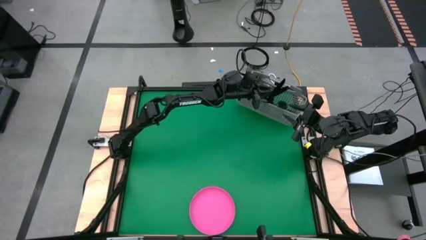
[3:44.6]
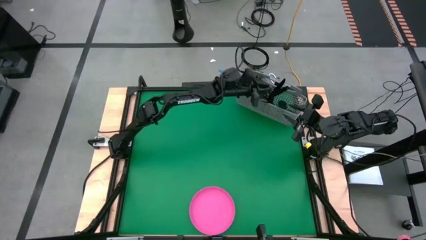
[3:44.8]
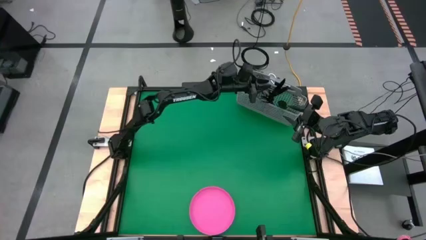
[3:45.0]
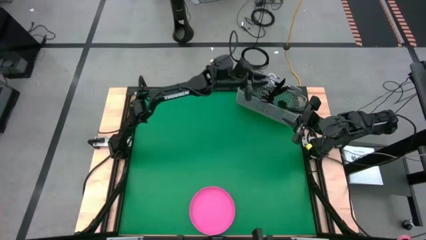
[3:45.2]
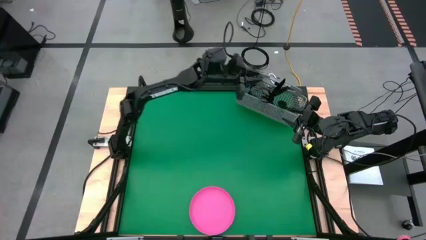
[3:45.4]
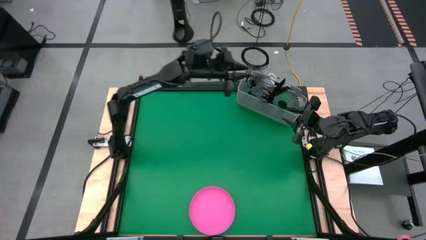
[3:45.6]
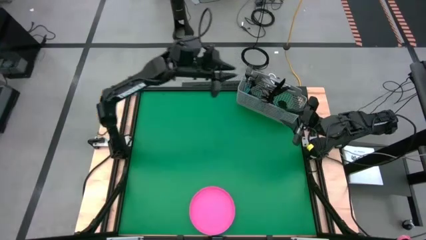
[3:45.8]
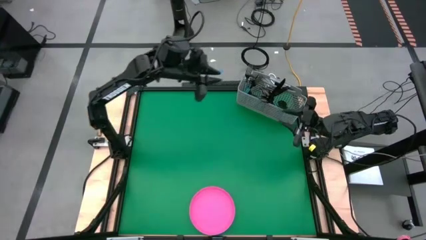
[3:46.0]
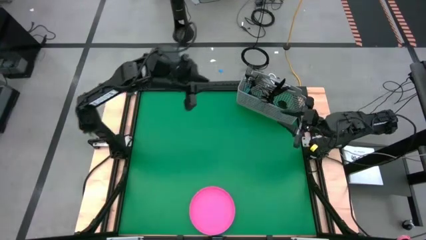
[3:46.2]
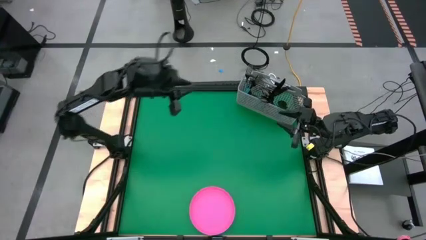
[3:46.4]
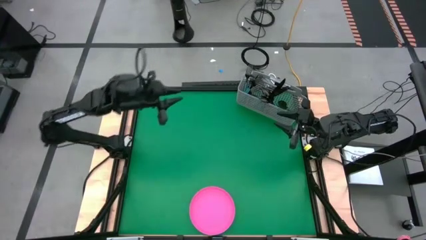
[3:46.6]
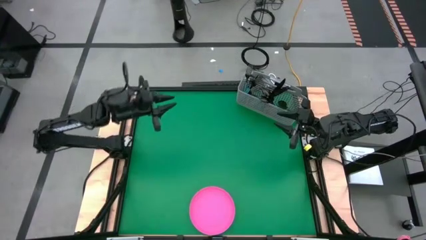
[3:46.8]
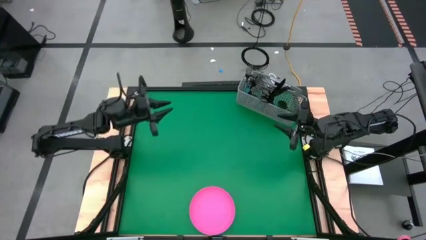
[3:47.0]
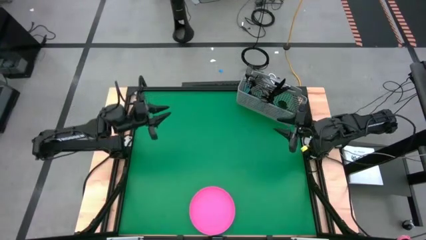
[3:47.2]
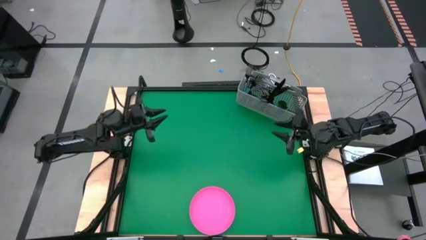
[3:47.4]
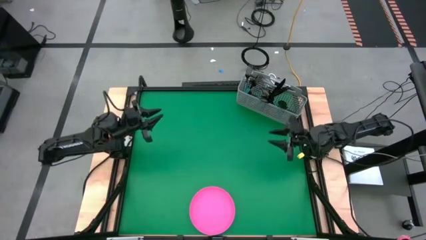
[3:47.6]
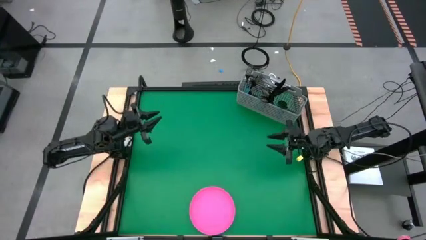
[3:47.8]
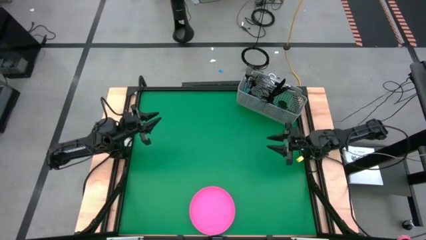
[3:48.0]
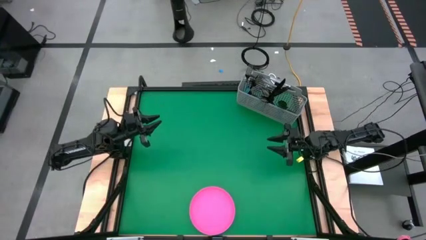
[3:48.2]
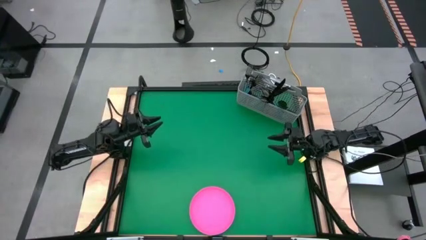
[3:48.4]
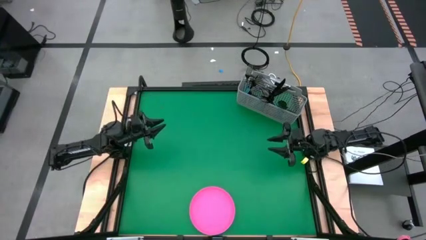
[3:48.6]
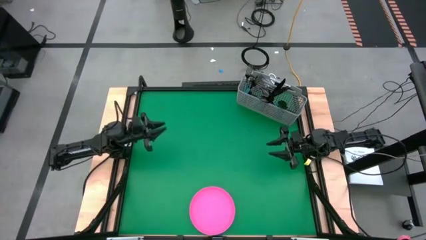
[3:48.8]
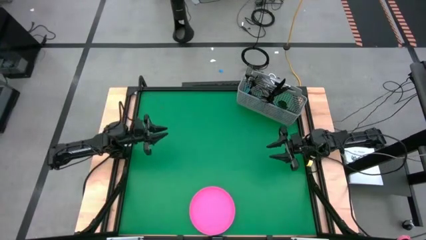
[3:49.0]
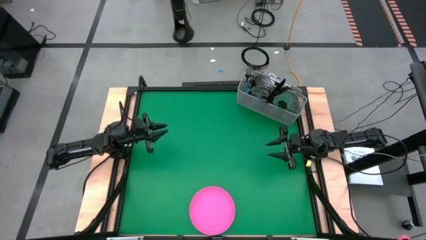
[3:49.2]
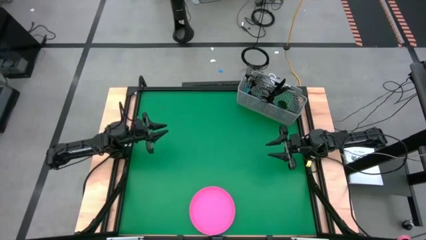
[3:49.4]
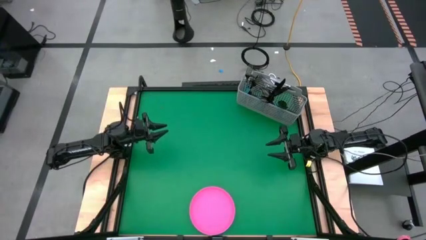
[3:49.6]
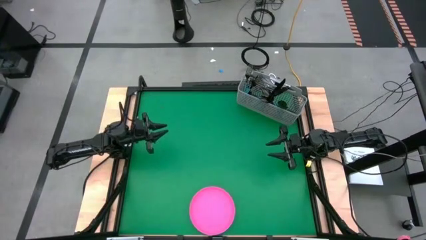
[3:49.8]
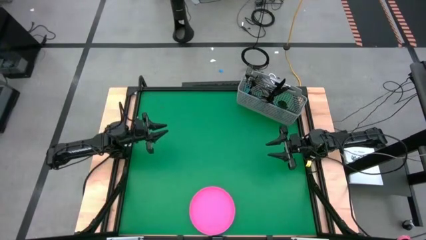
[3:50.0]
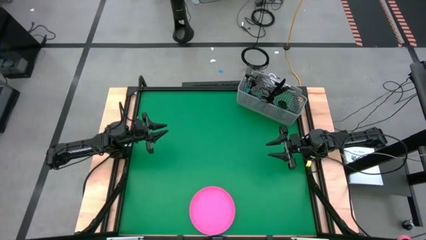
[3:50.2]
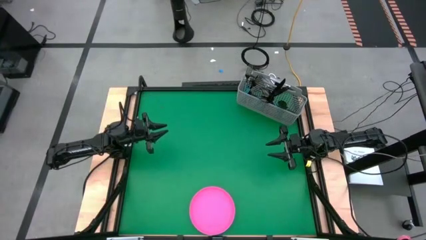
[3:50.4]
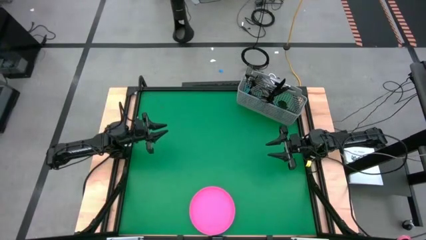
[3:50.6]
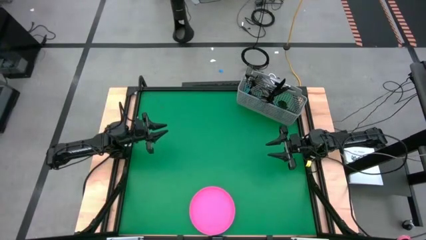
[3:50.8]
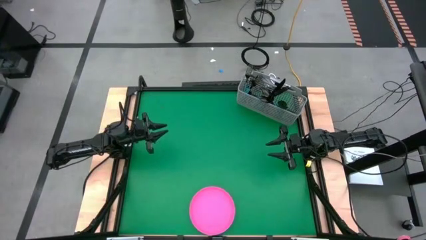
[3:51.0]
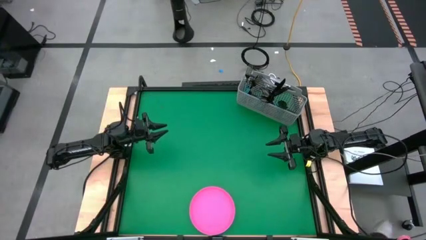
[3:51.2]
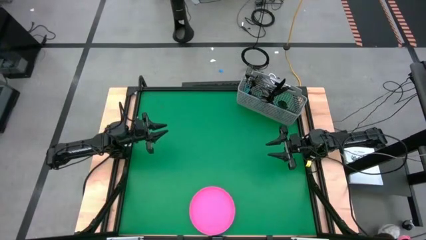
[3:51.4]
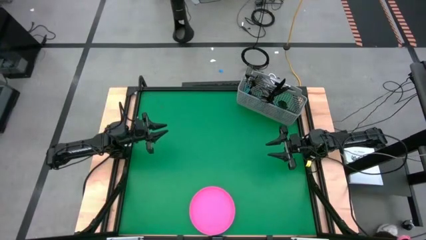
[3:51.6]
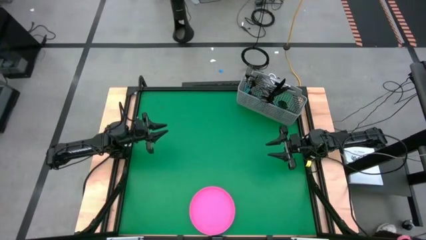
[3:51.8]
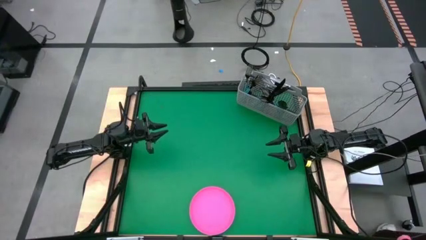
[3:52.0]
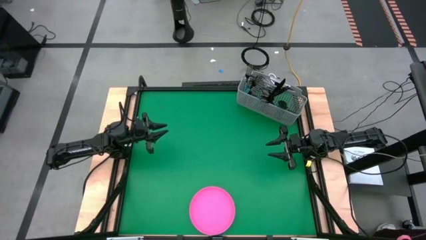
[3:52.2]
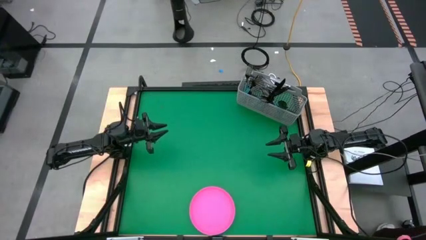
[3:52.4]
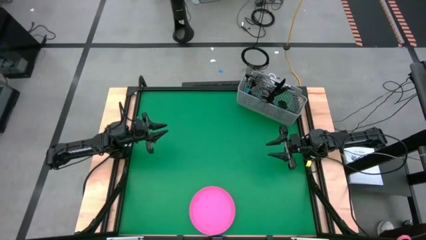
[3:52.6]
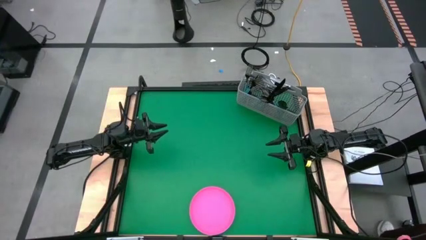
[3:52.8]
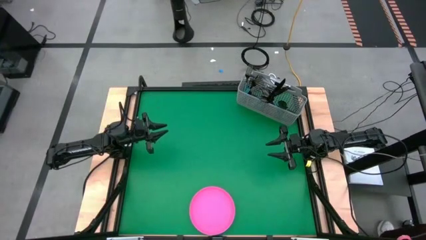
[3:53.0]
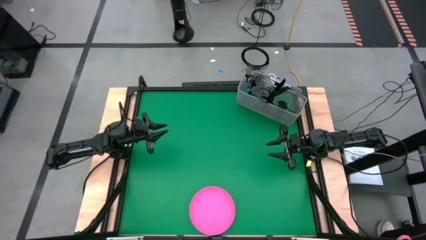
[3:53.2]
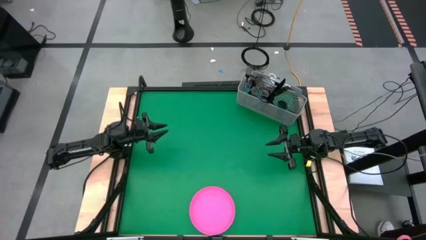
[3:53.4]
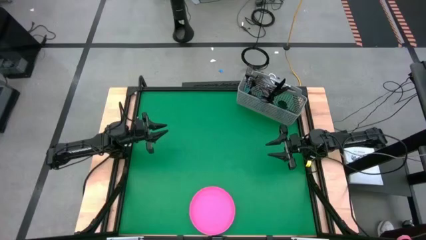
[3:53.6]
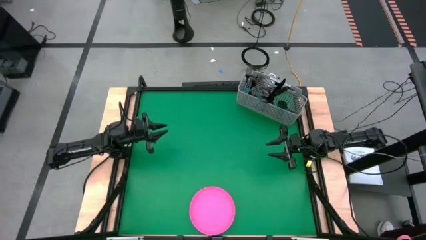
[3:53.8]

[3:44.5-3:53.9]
Task: Sort silverware
Return to Home Position

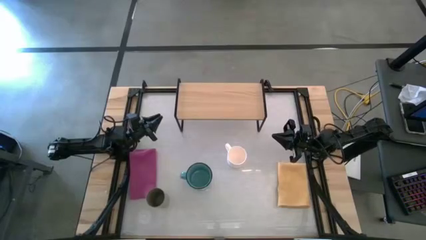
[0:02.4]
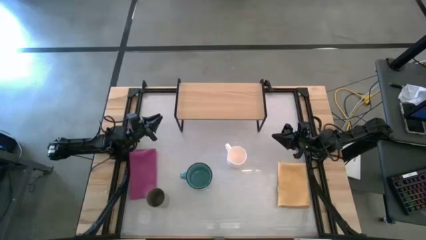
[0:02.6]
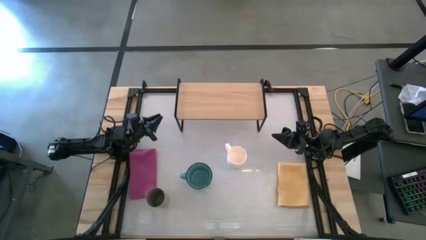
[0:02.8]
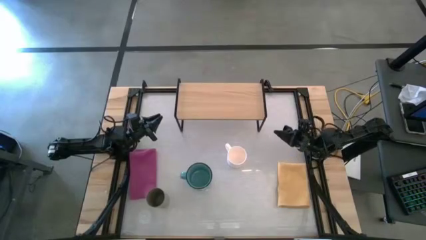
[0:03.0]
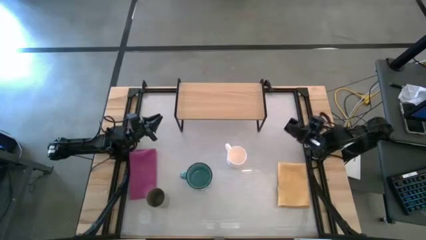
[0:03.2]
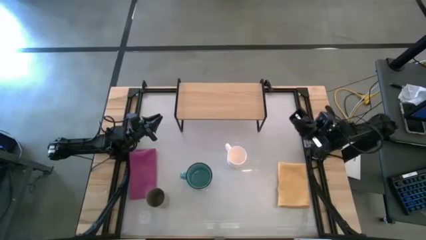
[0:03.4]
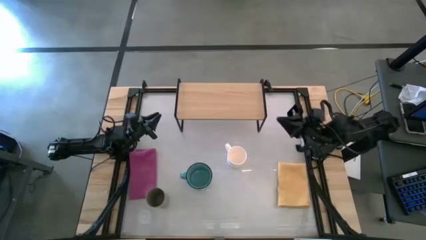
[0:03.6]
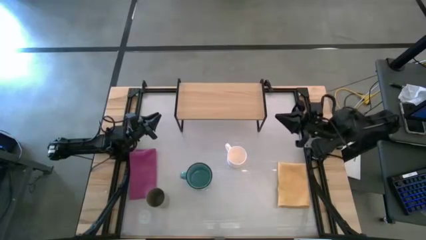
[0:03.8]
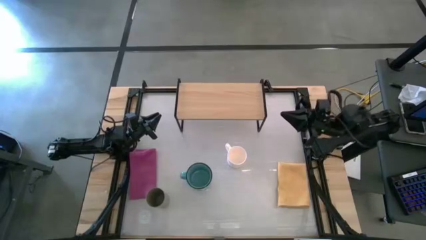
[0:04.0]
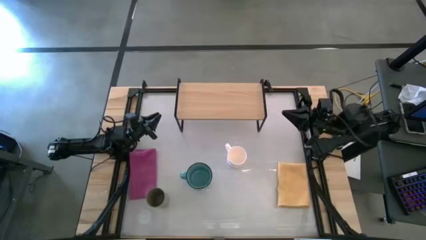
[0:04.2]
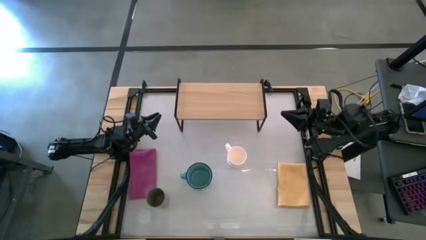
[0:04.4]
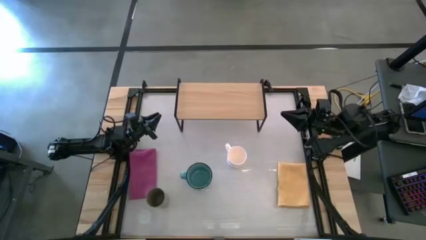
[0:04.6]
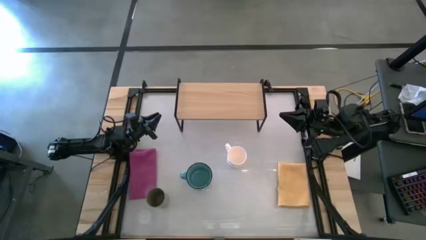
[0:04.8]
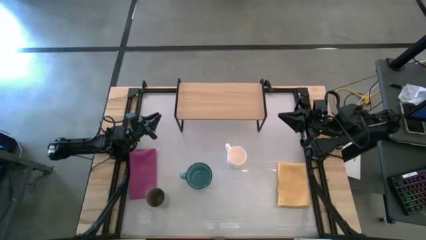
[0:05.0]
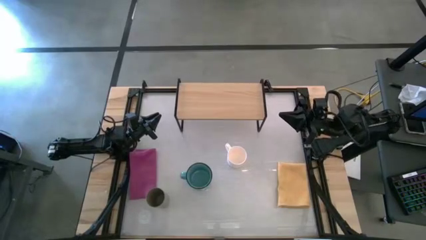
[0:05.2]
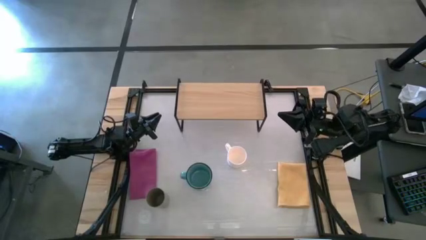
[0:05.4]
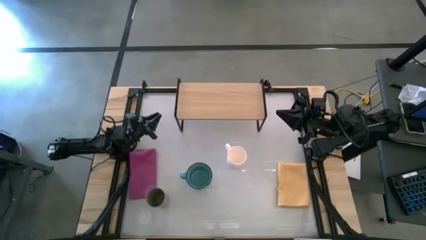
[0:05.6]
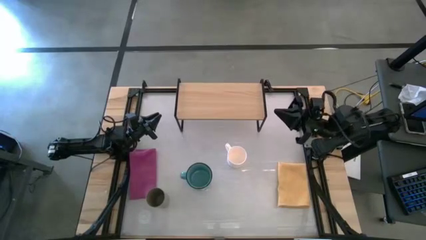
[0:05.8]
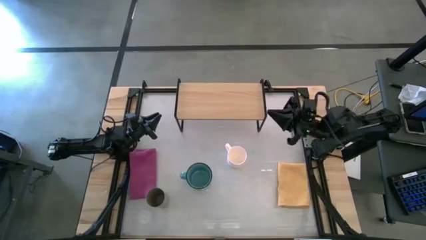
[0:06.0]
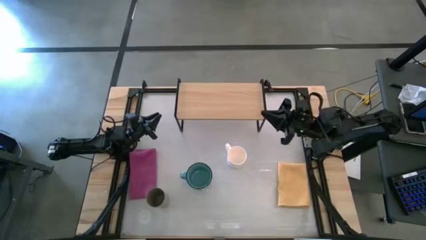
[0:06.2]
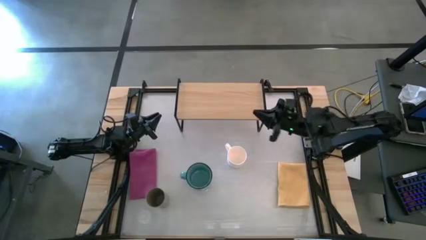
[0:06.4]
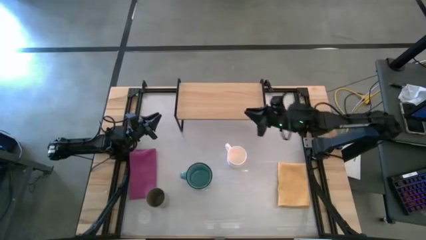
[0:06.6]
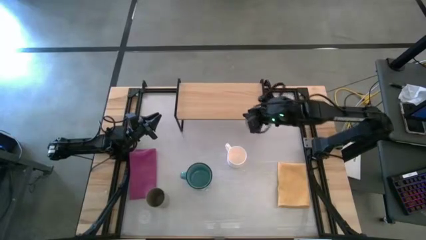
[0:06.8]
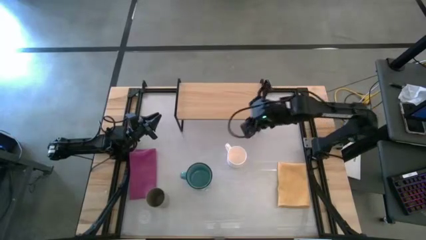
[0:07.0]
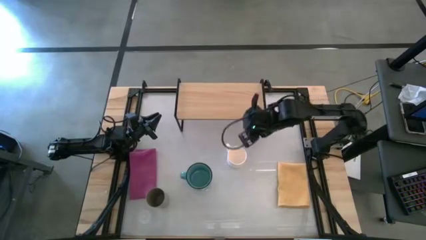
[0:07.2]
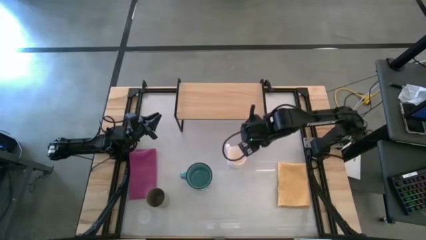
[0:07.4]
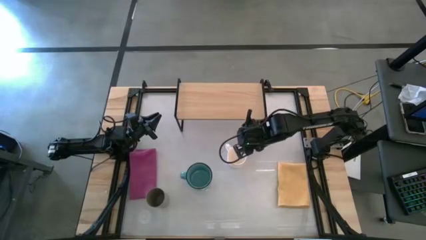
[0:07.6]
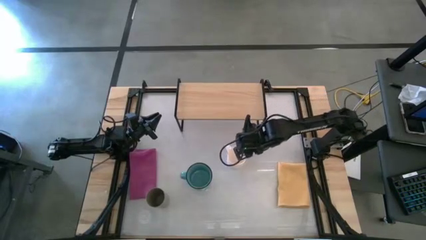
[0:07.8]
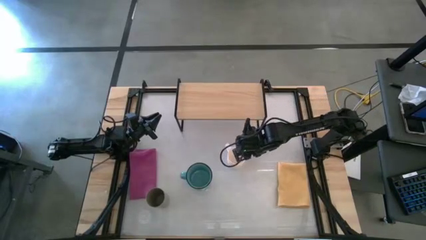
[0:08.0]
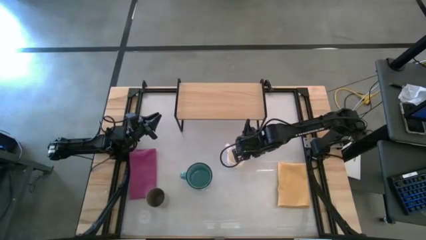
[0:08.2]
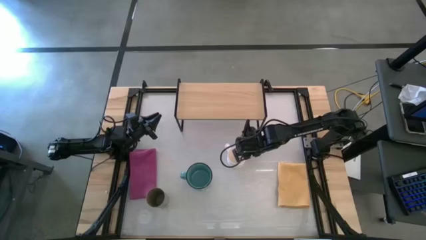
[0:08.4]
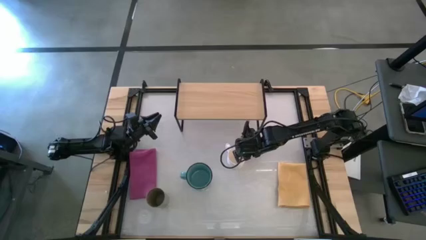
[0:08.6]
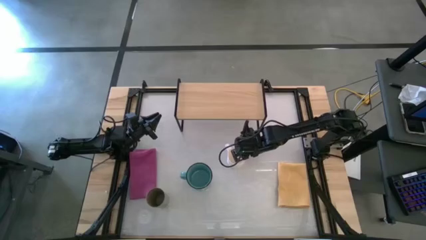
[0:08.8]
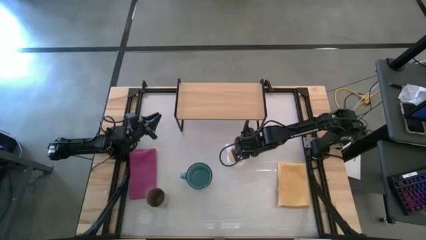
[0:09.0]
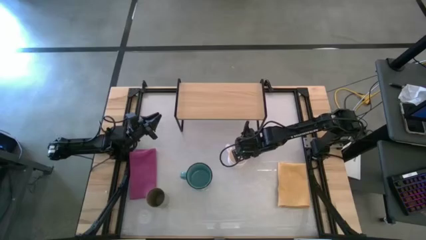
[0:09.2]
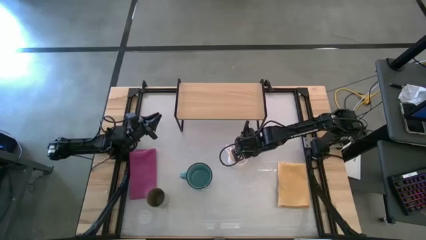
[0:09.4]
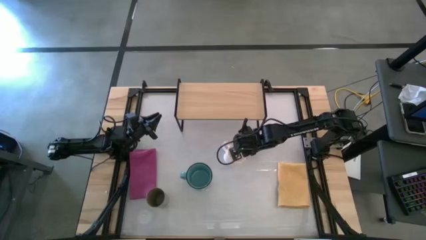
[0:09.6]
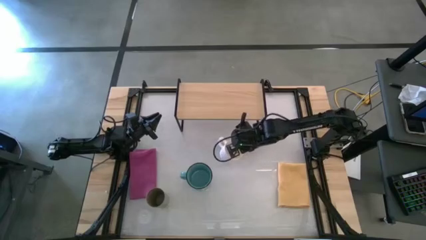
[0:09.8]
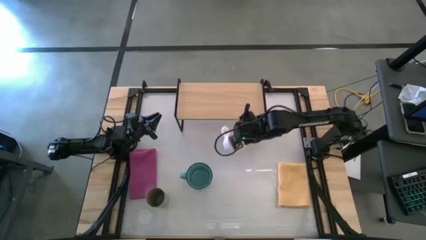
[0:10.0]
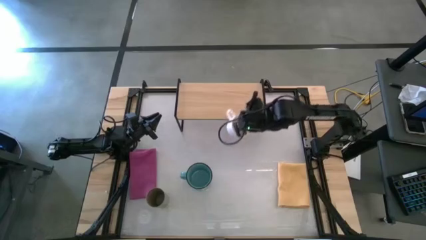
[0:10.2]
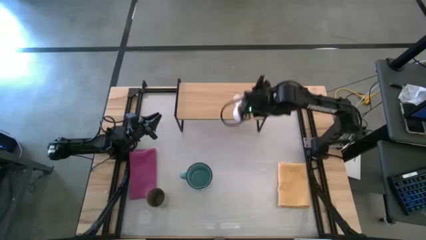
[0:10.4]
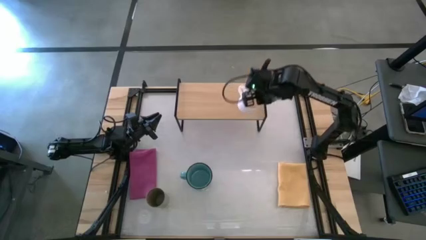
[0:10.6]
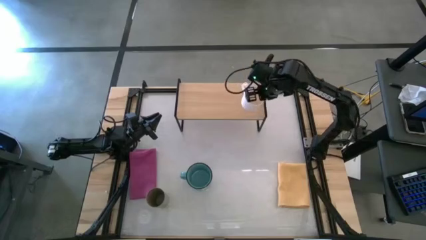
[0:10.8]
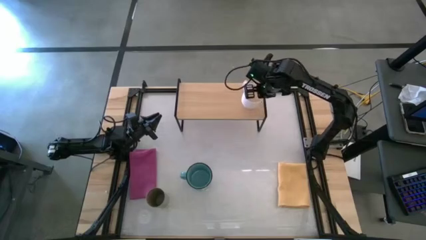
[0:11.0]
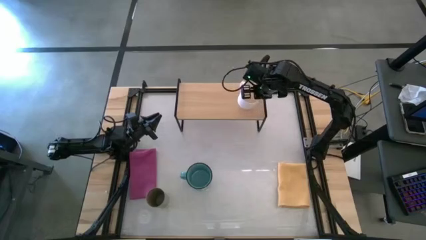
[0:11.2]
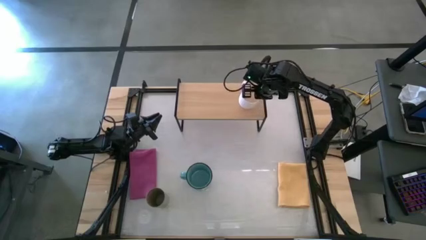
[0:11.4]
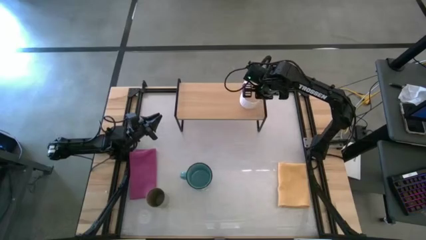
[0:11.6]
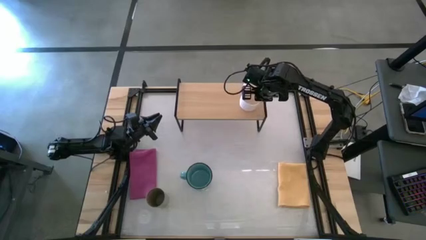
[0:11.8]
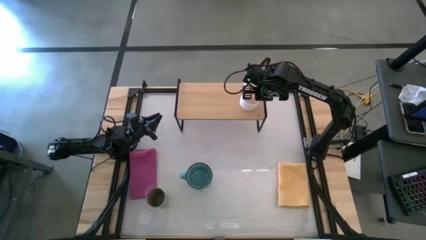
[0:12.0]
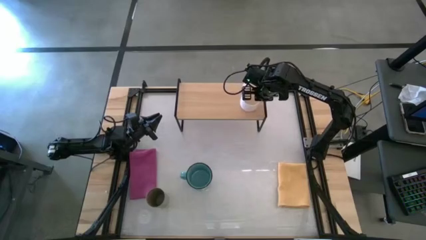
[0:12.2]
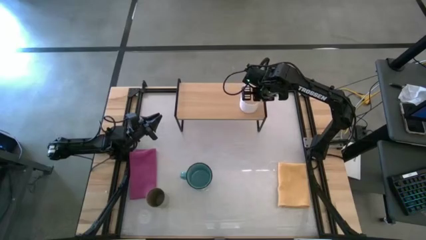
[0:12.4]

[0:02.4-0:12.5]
Task: Stack small to large cups/mugs on shelf
Put the white mug on the shelf
